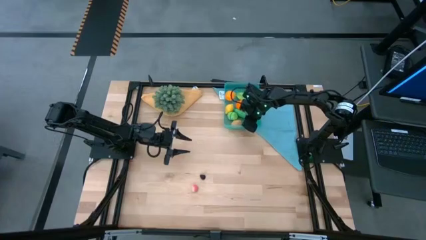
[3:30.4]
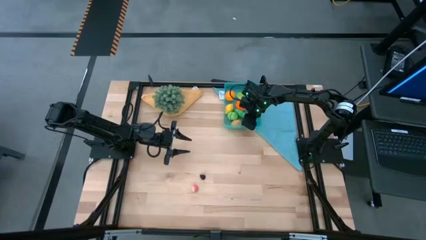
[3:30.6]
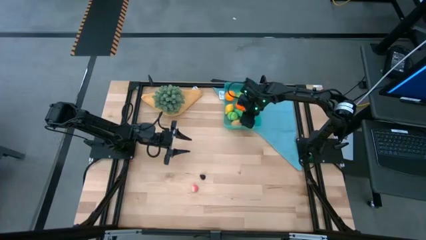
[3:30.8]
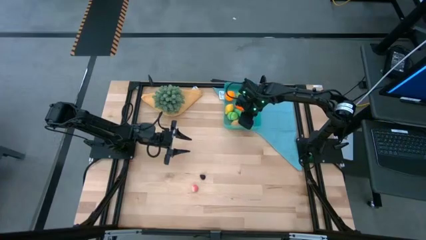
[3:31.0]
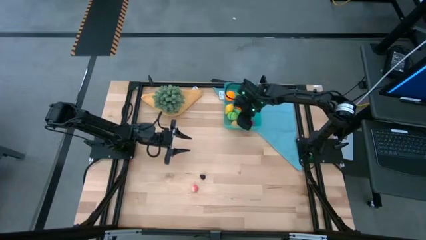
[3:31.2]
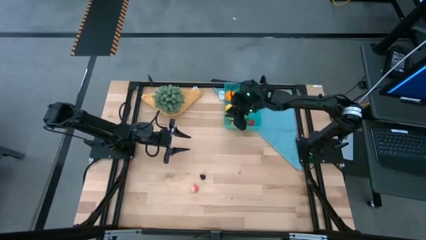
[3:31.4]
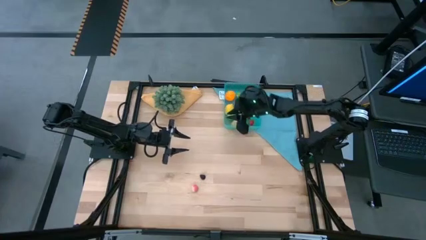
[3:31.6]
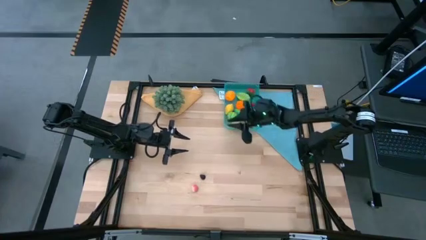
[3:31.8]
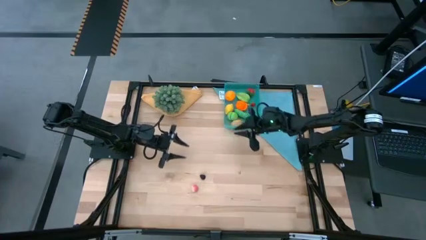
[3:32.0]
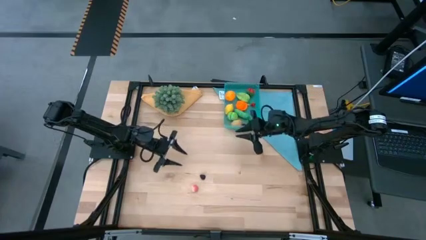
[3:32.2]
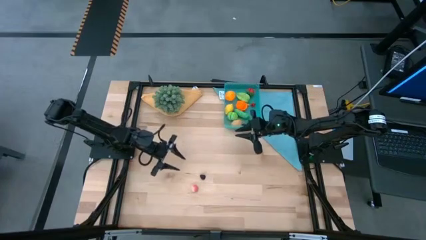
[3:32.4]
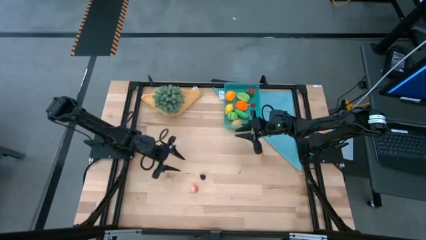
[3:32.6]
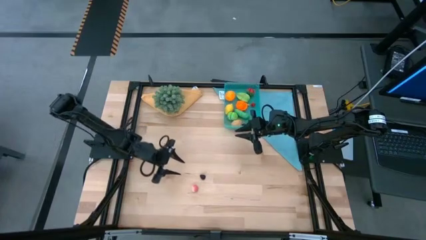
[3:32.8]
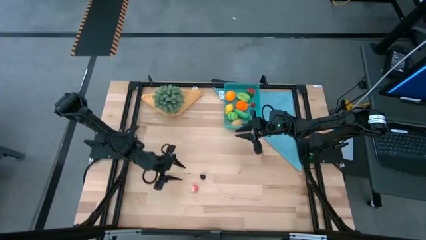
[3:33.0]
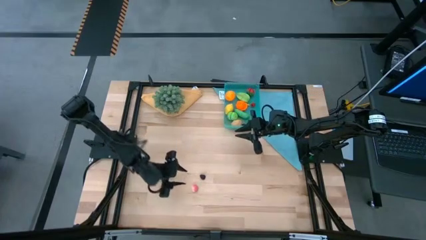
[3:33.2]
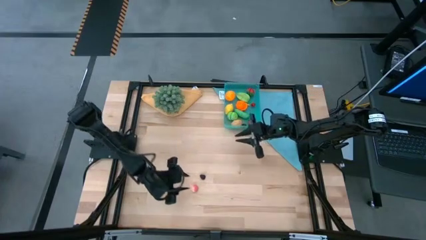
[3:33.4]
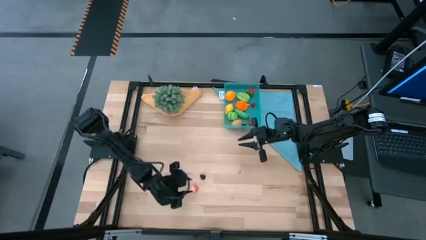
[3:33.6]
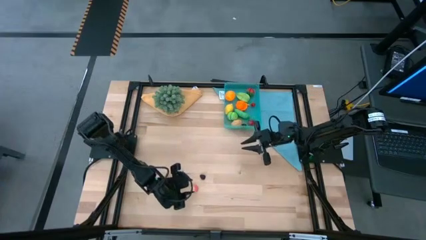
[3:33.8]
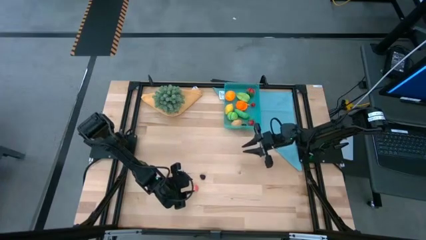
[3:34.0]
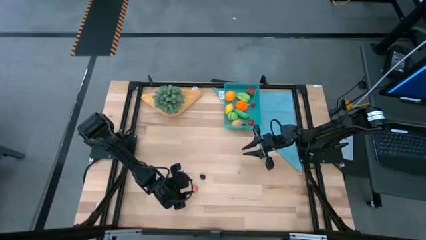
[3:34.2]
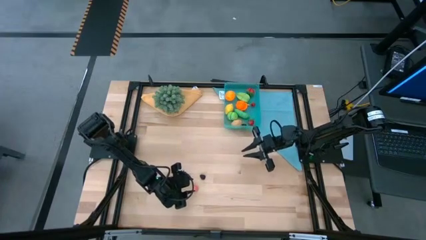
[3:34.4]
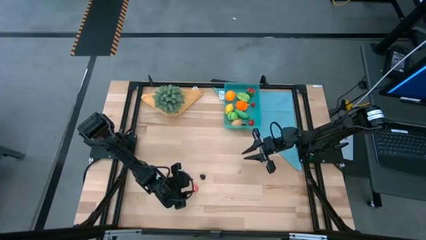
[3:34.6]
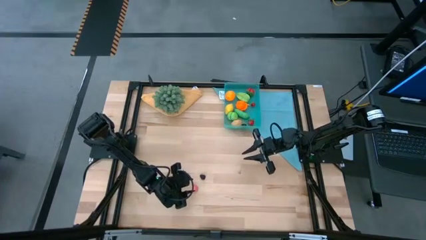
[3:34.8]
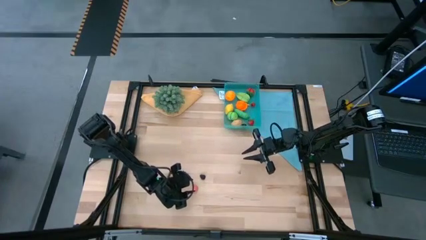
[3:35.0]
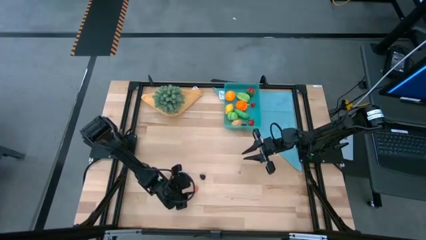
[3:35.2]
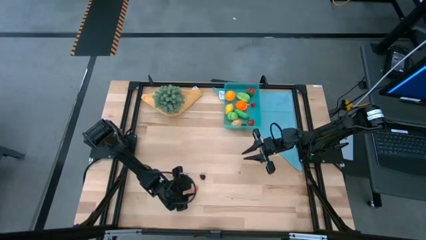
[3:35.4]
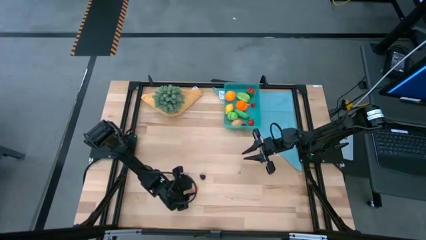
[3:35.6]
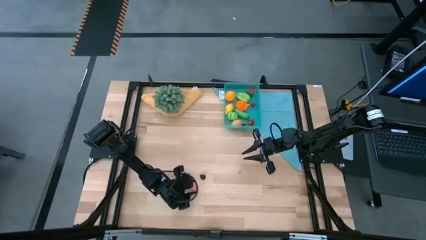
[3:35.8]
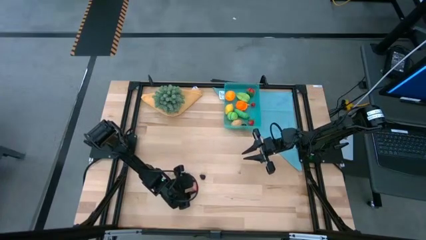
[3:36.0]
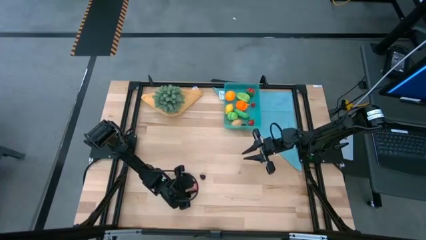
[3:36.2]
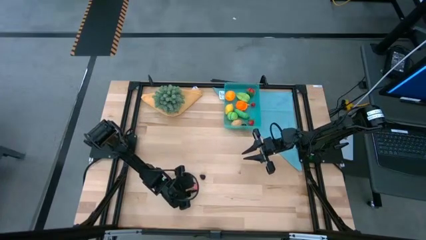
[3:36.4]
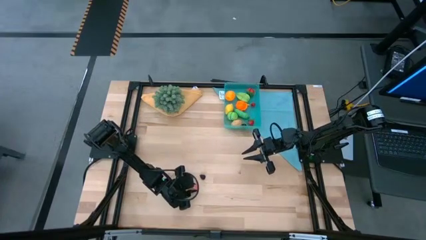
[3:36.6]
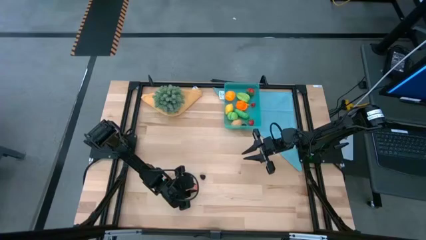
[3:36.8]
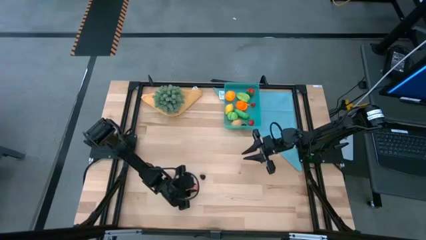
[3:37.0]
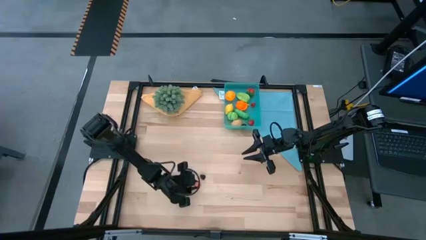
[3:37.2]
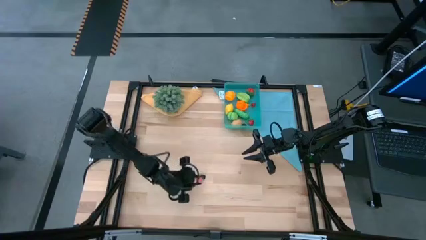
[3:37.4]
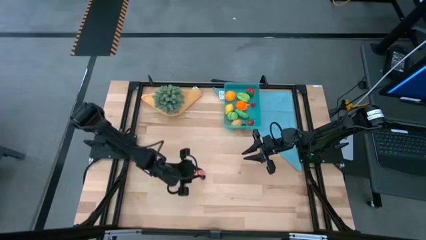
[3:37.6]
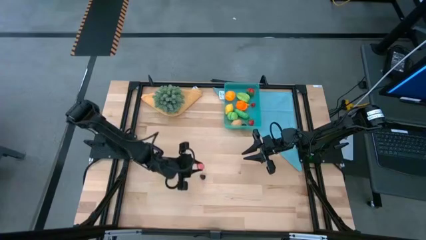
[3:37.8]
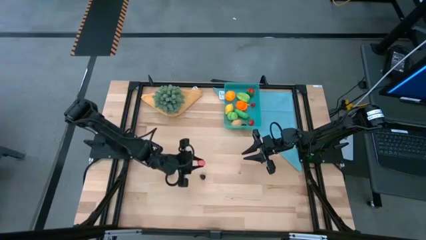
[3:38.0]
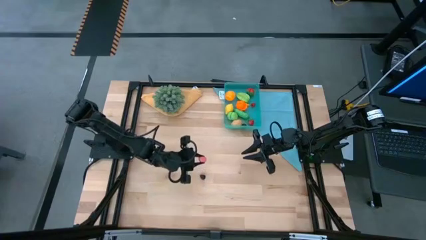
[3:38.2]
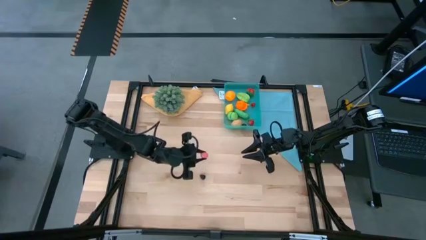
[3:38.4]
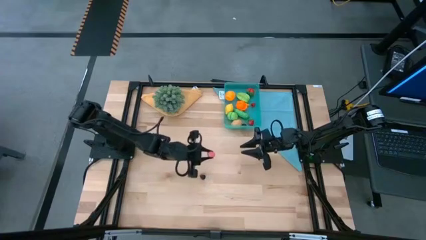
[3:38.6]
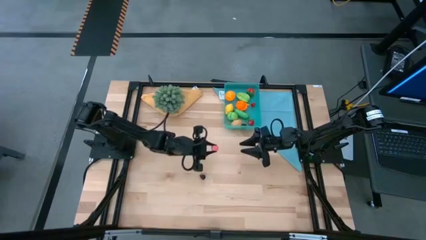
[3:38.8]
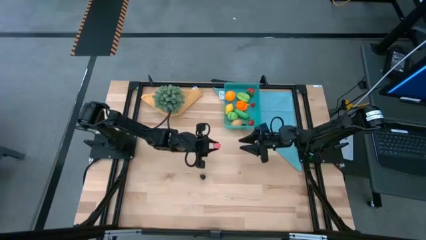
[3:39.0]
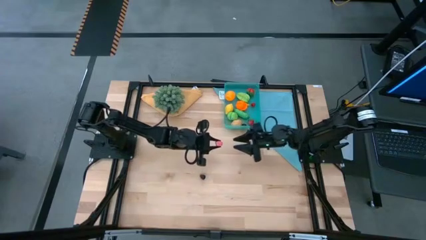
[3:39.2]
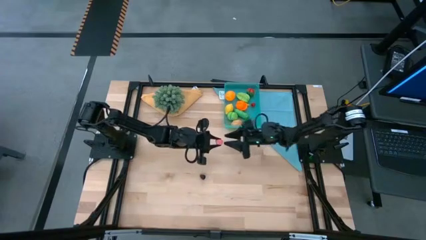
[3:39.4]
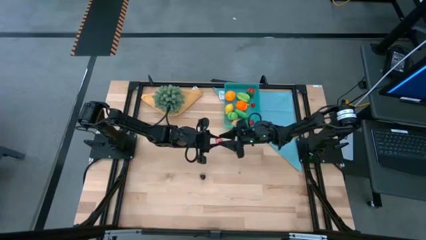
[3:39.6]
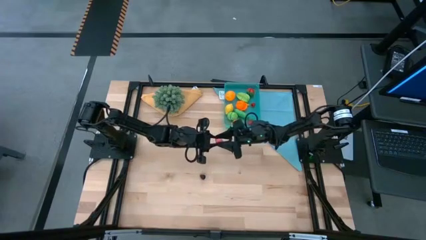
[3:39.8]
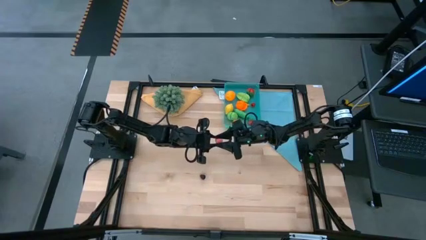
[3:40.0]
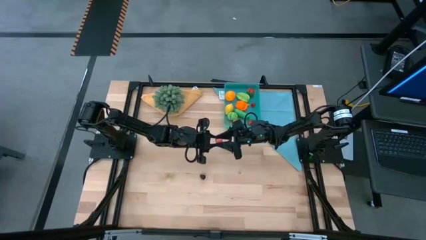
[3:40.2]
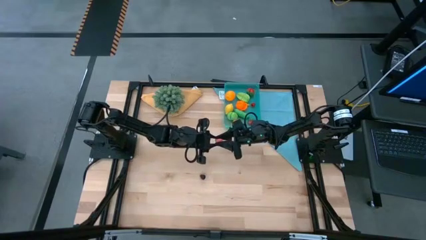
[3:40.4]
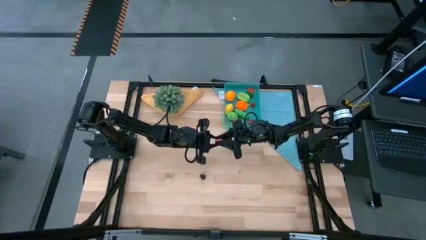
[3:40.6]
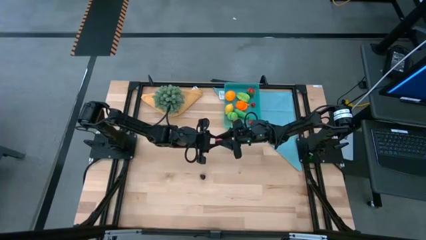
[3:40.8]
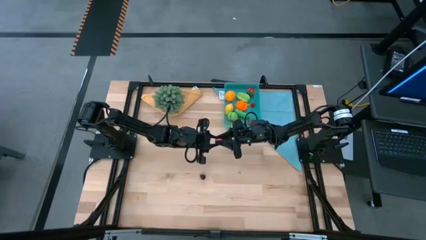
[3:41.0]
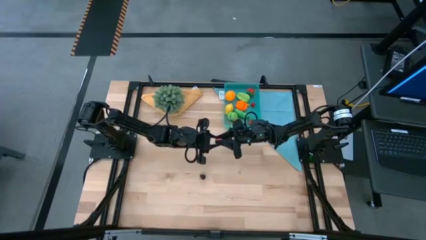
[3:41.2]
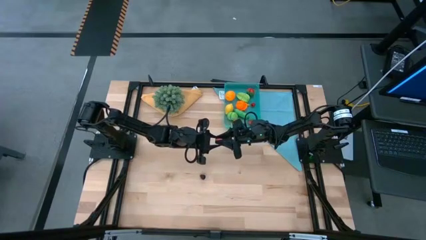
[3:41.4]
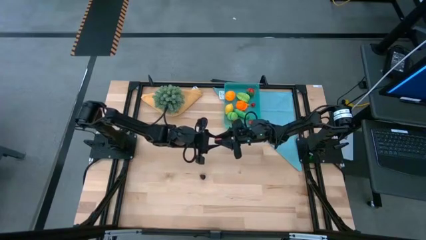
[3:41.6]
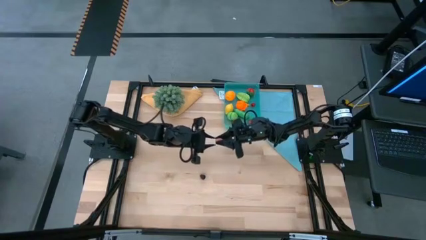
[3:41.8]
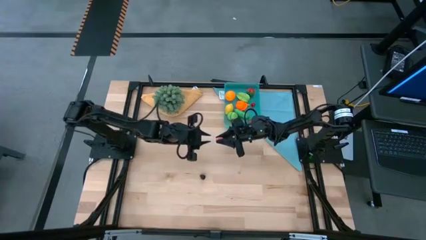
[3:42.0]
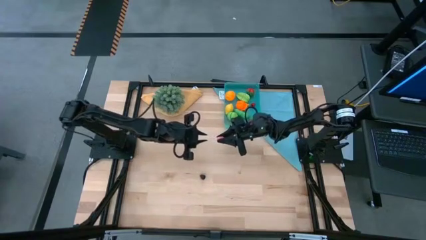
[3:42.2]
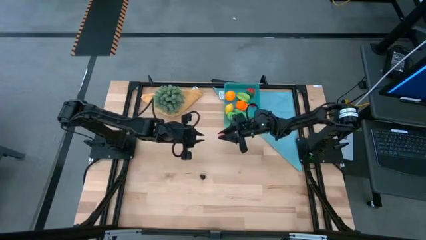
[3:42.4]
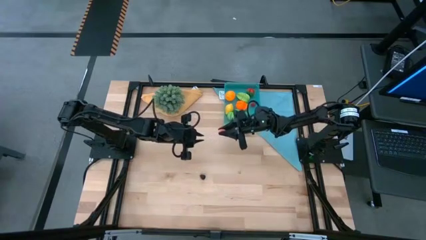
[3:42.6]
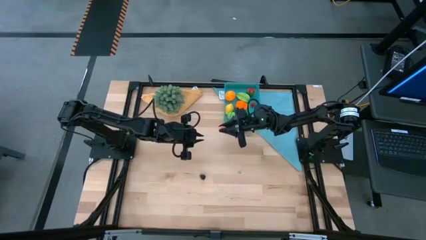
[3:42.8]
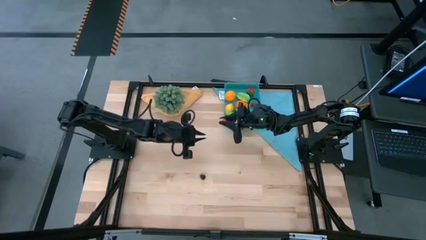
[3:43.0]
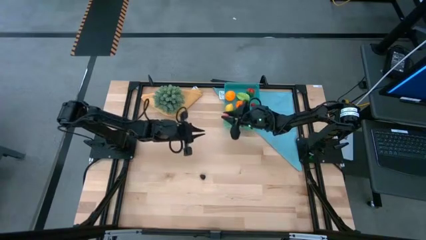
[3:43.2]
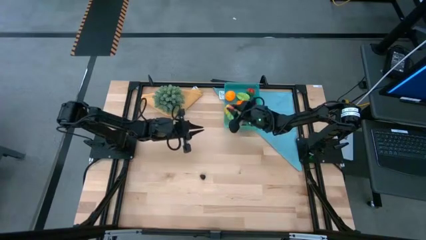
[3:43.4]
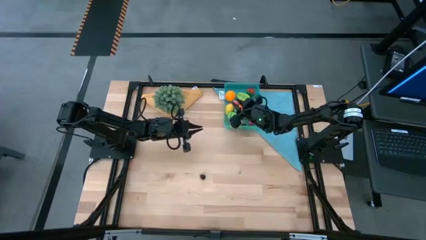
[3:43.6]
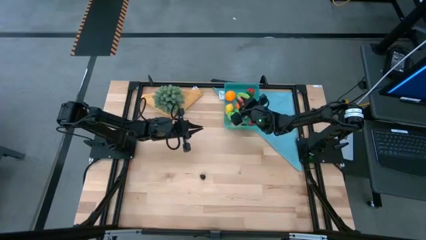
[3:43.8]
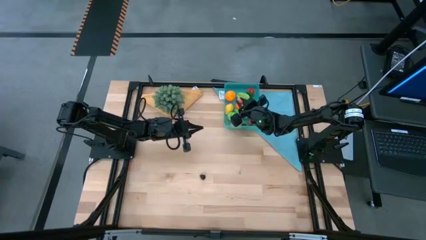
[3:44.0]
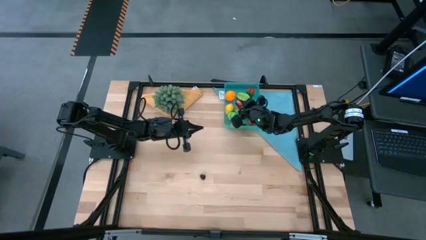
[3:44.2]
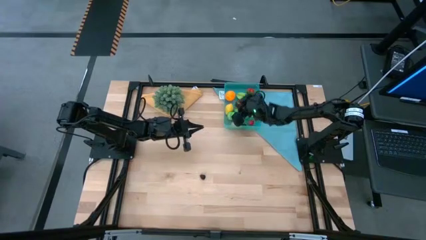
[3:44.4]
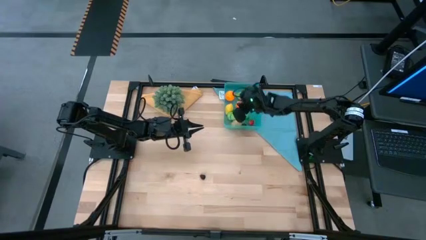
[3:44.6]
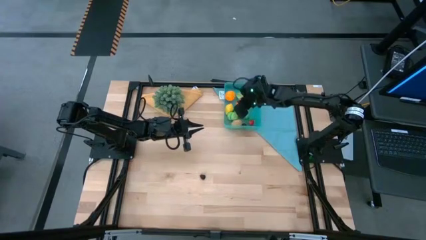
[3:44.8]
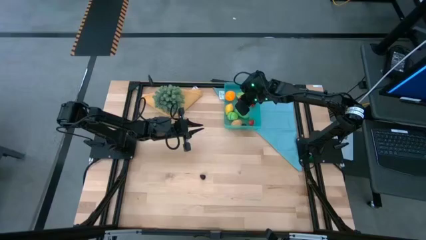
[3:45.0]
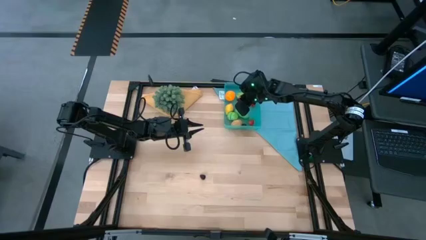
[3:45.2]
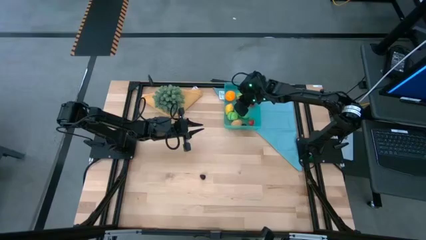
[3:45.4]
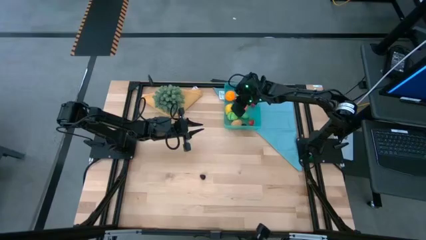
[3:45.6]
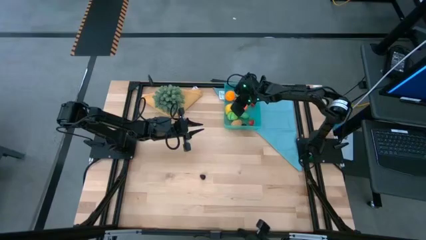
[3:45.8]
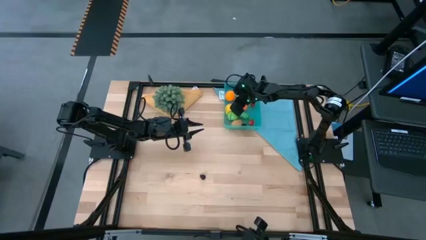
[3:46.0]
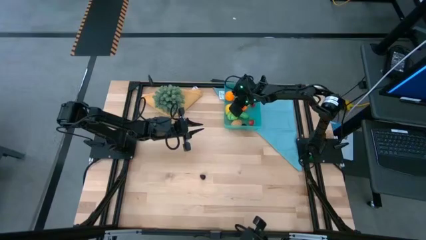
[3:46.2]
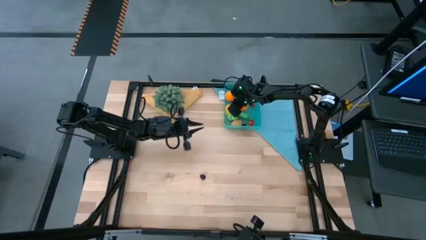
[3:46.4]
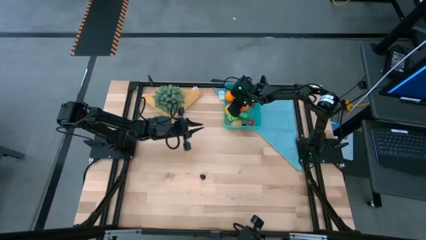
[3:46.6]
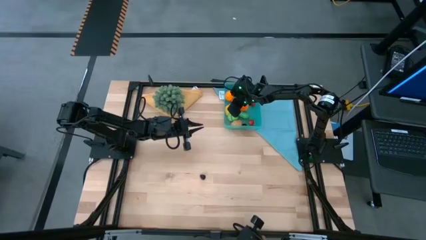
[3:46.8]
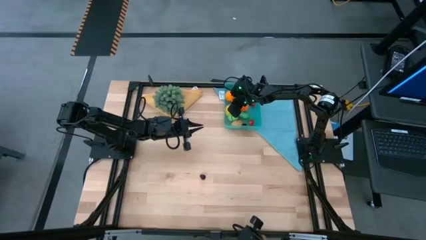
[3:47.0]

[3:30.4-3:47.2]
Task: Pick and placing Produce into tupperware
Put the pink peach into the blue bin
